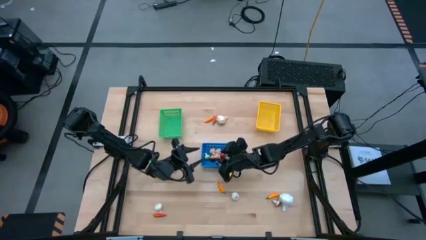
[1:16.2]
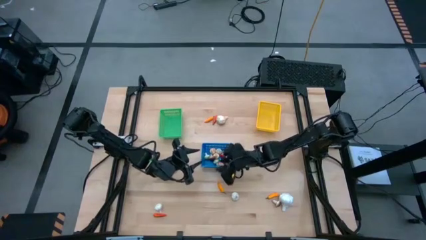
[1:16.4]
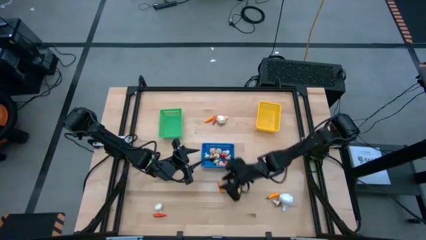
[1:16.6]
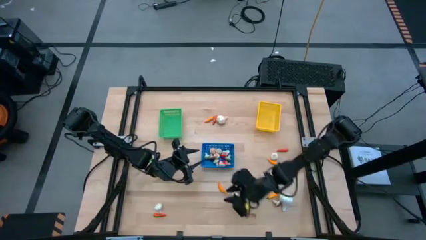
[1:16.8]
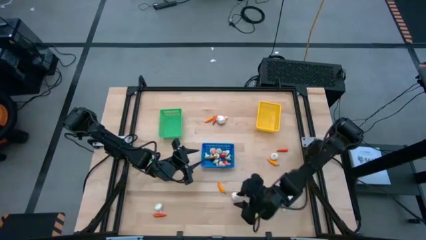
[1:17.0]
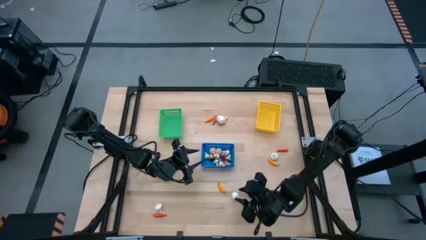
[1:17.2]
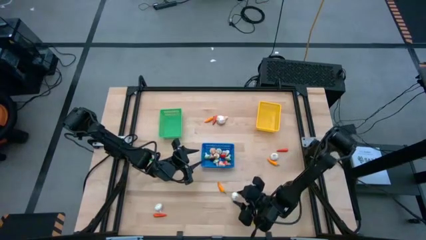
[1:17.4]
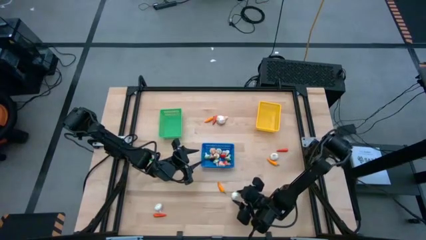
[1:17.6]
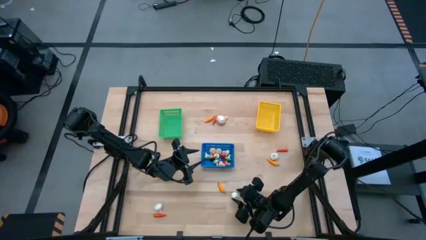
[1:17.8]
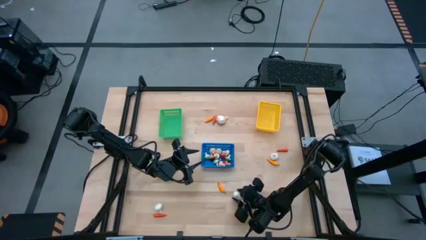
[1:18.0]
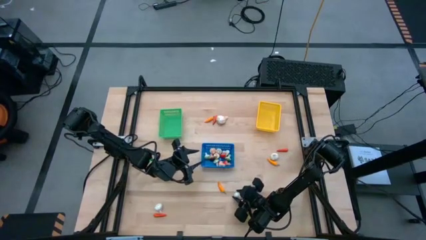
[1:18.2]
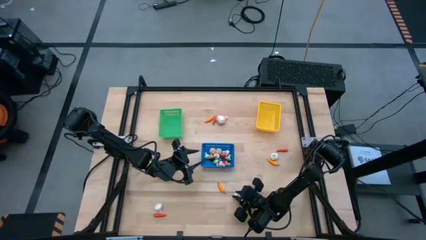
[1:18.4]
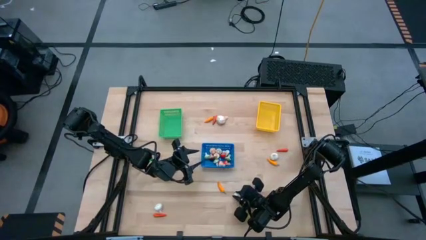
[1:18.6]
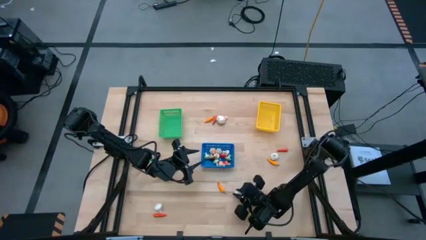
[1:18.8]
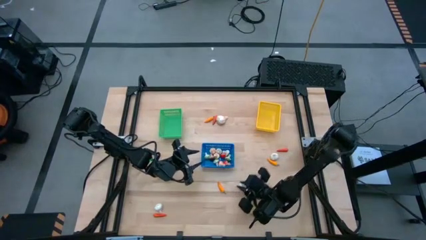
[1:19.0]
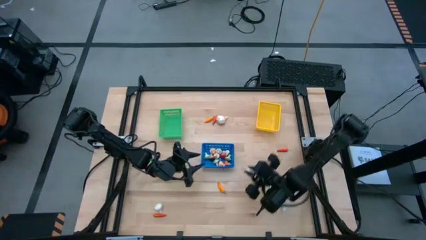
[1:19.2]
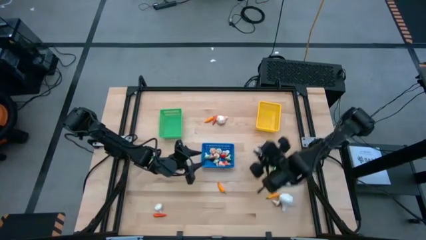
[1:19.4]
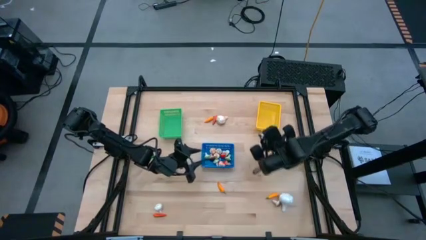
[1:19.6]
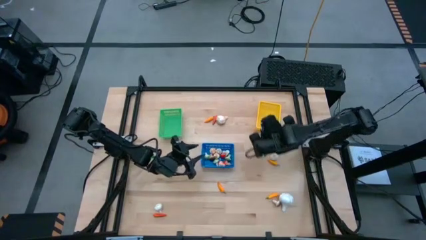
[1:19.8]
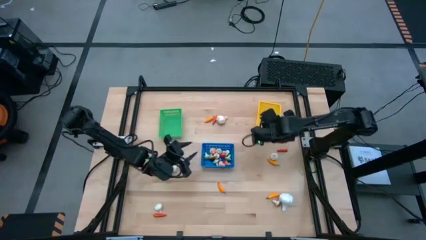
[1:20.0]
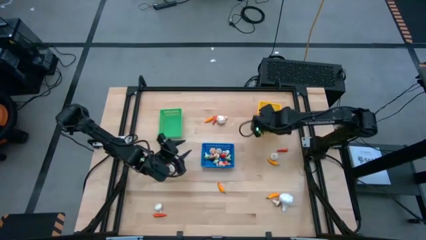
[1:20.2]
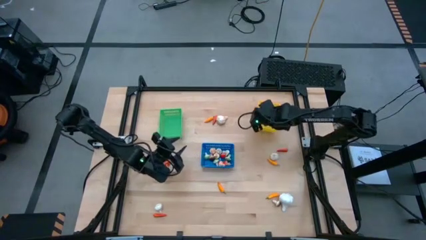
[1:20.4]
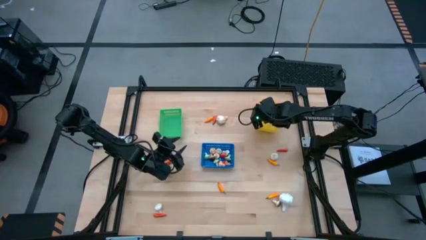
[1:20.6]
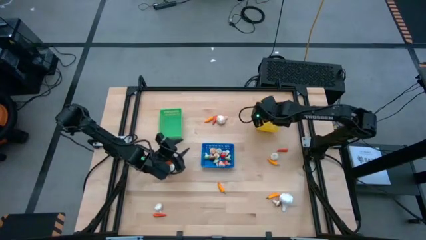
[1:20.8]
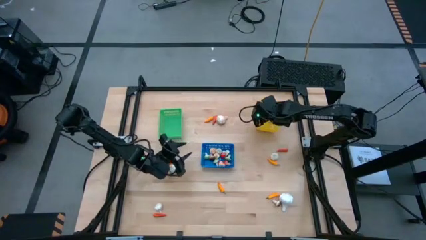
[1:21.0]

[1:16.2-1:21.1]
Task: Sort produce into baskets
Put the white garlic into the yellow bin

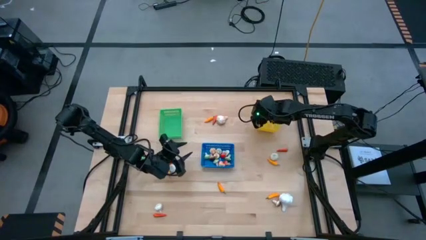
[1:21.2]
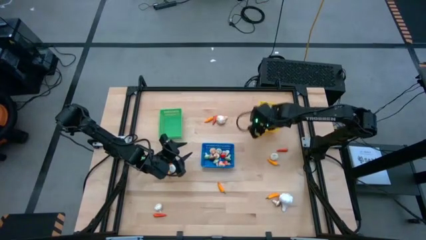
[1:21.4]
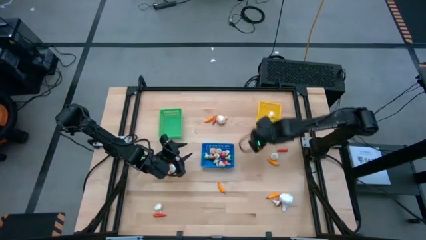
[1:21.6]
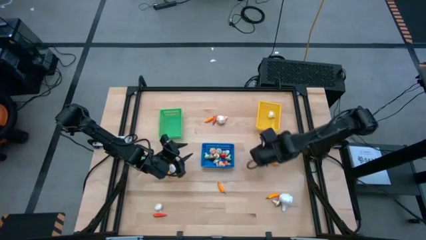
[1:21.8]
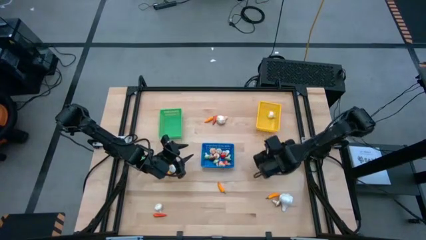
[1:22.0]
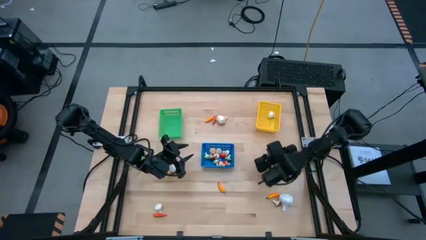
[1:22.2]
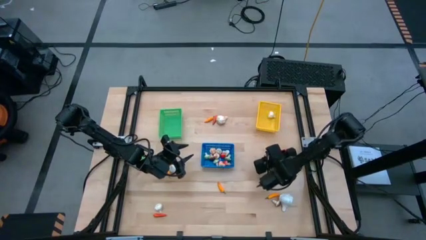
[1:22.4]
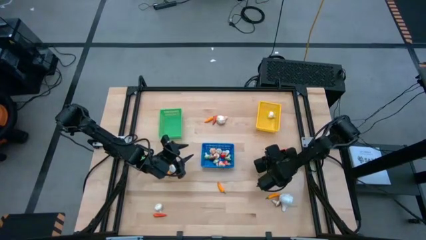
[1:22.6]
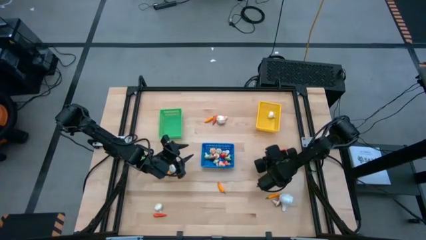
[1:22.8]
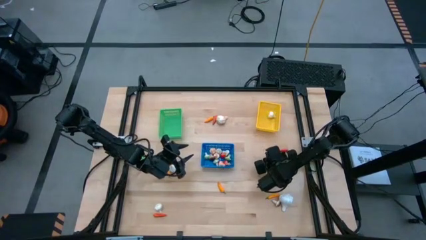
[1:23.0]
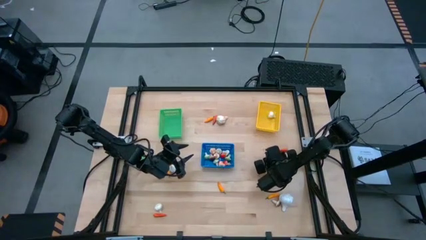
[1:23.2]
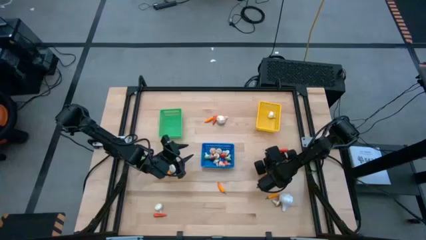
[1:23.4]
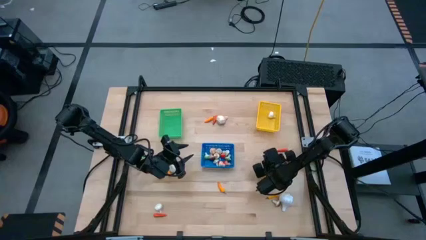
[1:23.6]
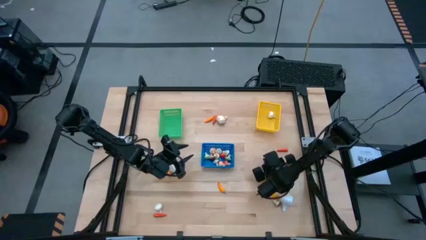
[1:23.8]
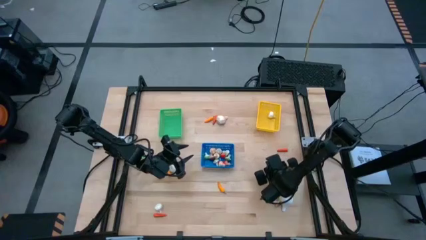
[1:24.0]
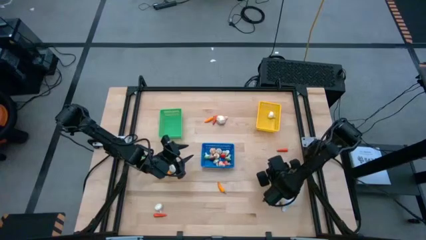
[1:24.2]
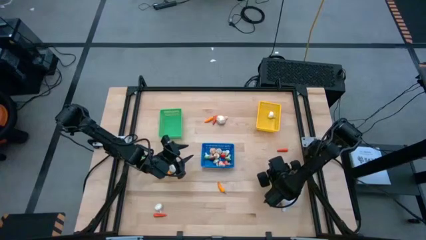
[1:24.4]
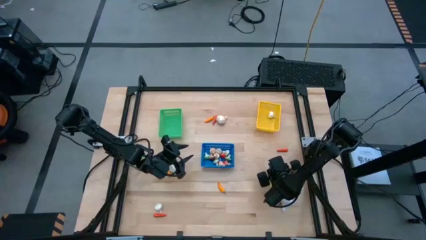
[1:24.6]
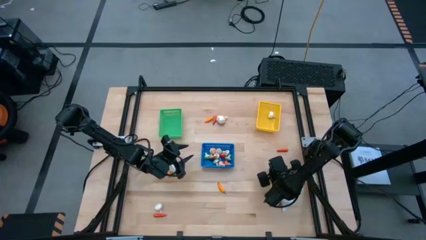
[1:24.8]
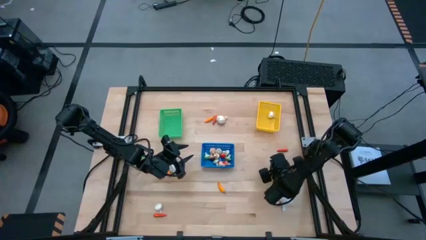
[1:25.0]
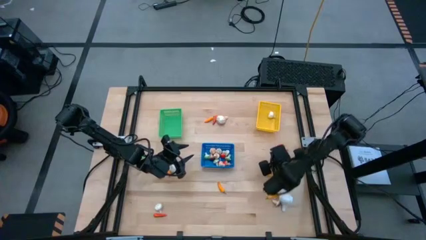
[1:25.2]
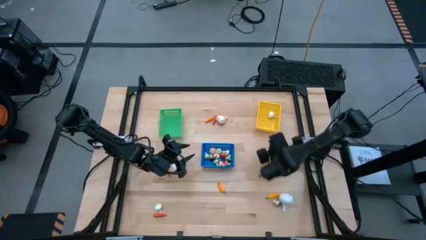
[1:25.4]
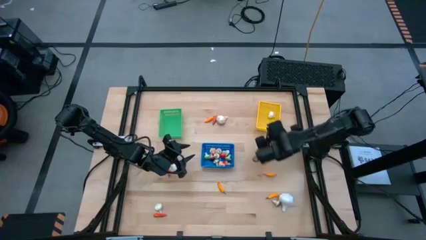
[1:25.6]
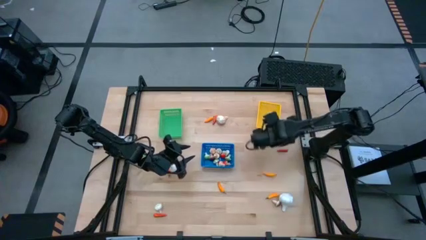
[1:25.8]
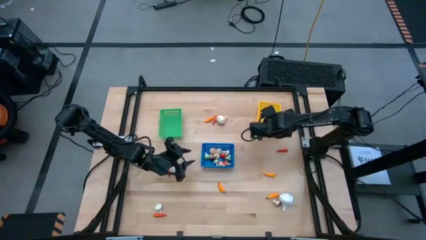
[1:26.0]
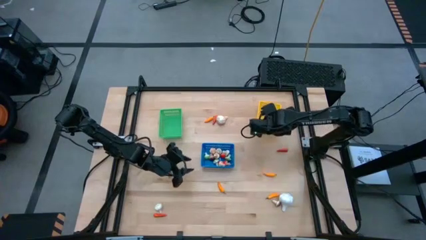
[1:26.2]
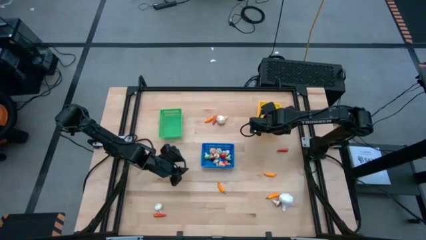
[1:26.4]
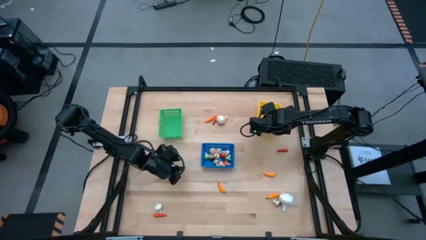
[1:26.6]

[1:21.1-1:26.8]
Put the white garlic into the yellow bin

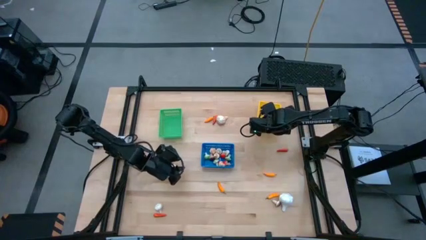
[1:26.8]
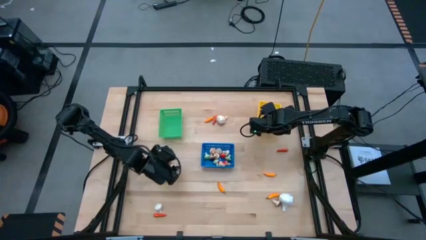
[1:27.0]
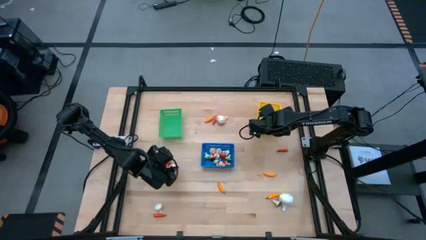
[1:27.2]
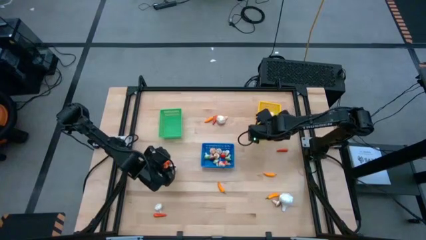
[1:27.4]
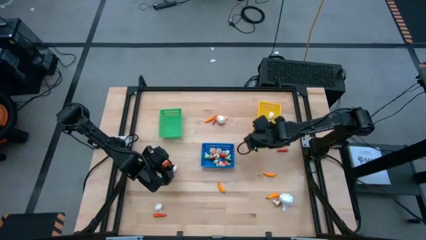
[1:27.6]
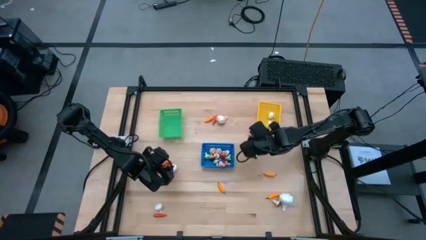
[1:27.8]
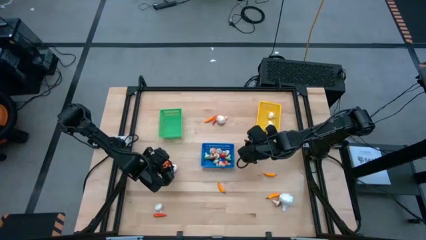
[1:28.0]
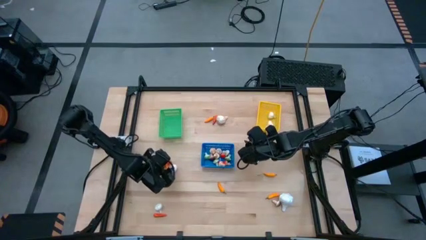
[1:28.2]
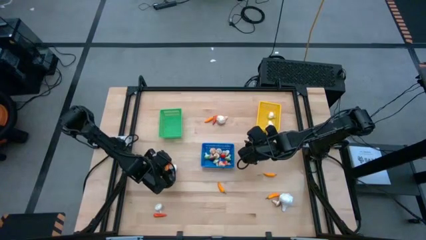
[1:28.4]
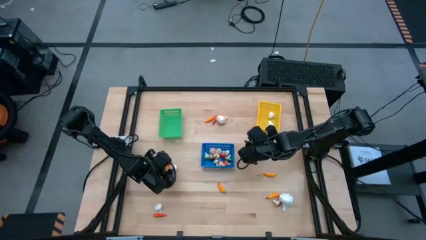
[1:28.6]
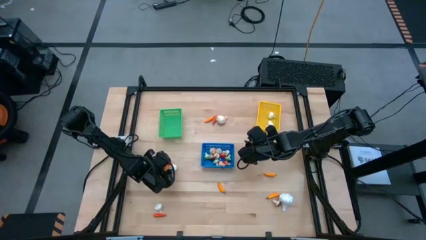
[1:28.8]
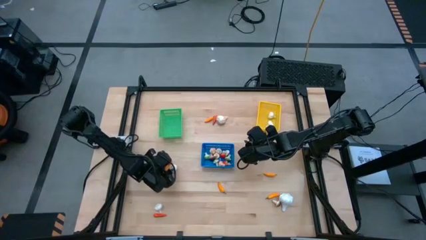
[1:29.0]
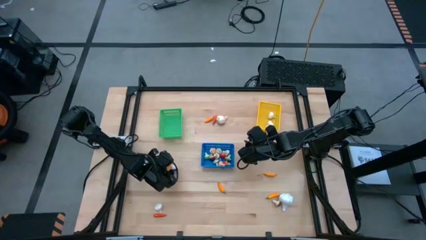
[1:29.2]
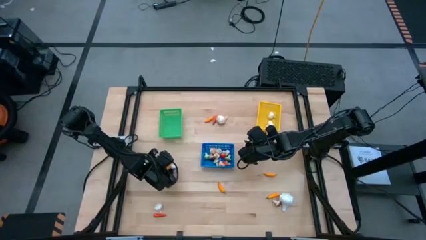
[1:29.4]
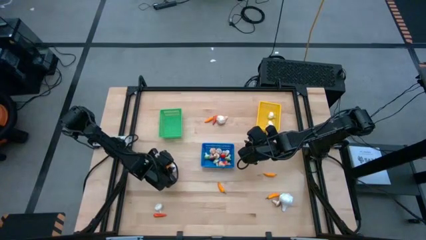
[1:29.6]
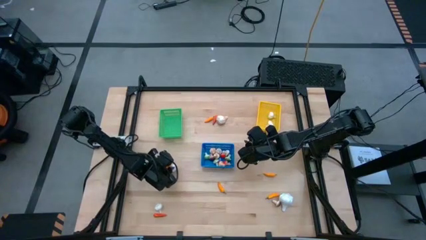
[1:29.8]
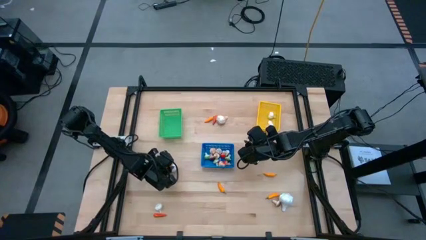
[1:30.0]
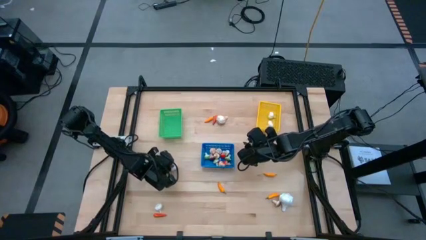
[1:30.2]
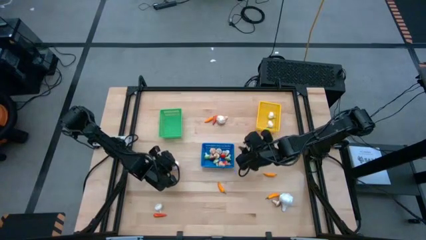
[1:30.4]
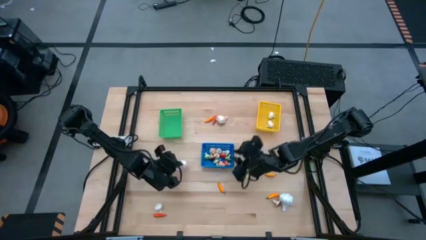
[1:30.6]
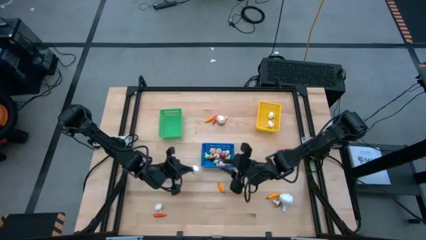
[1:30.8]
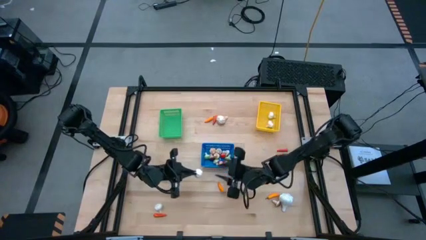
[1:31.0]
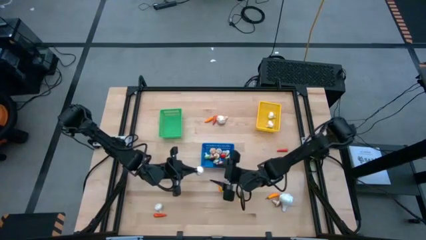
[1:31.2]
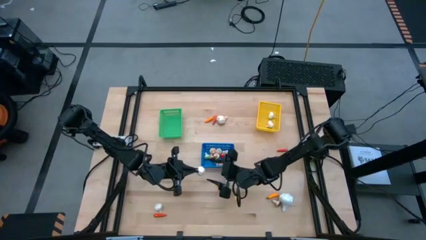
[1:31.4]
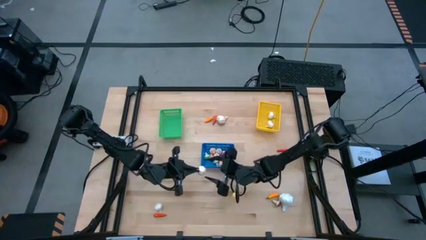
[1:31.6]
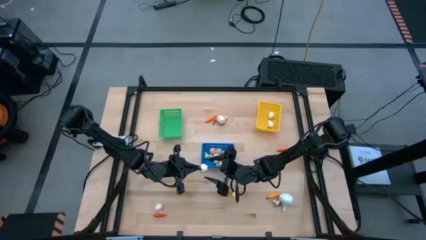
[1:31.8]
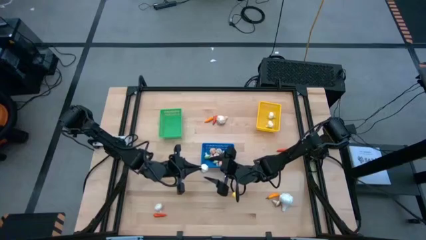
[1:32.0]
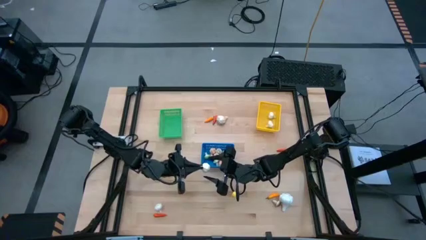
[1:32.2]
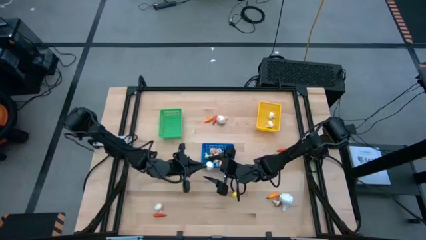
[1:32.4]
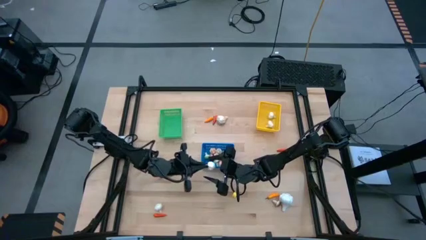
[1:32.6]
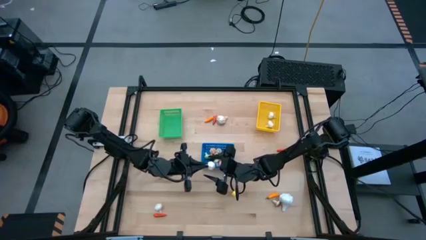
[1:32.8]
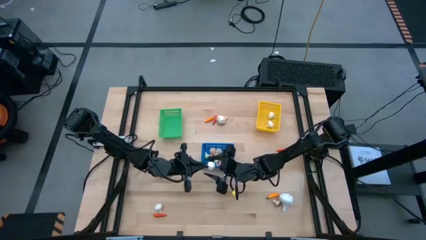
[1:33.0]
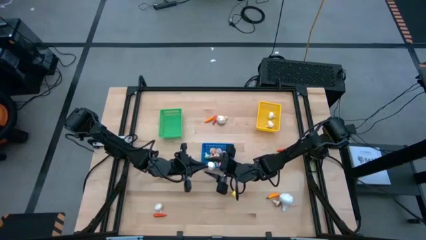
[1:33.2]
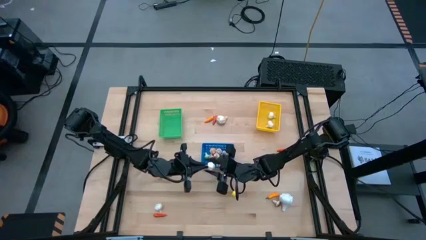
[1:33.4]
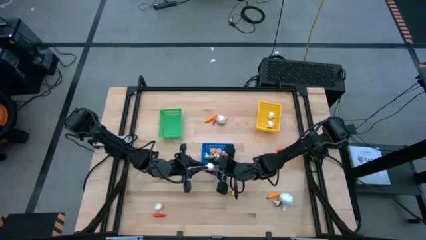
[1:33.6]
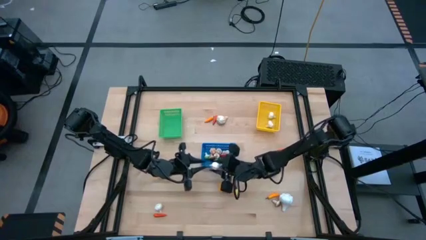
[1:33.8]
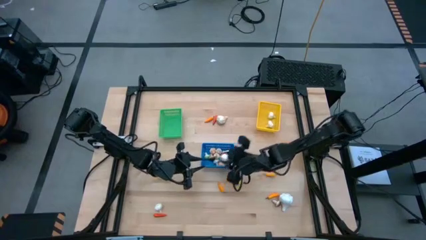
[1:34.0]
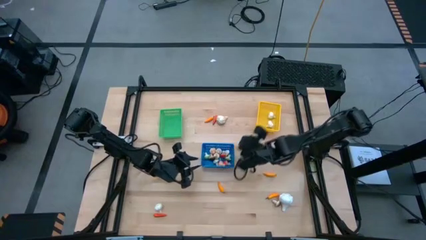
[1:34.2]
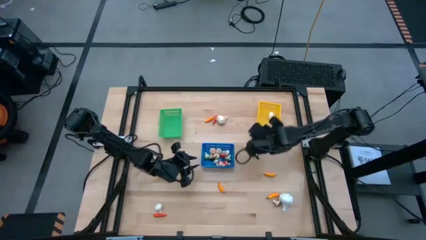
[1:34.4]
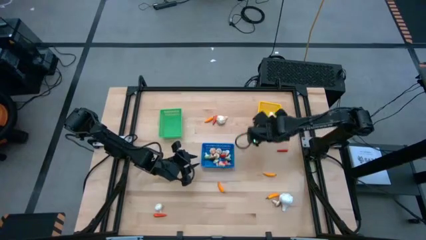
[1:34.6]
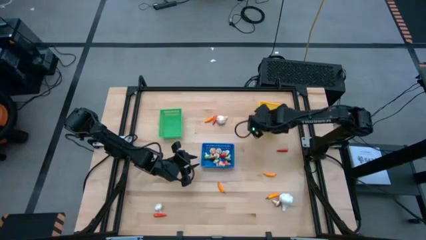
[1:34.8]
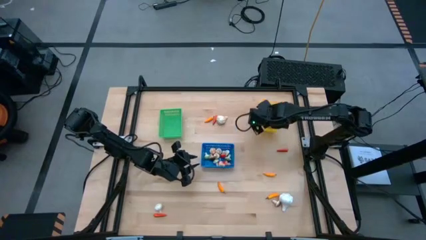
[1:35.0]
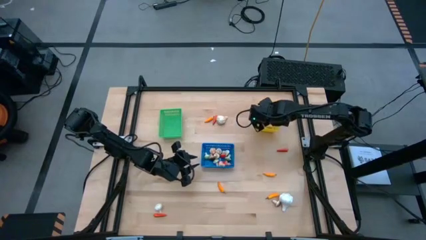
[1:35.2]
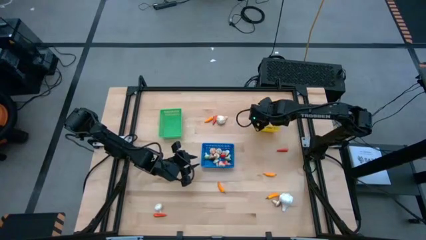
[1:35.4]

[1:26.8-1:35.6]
Put the white garlic into the yellow bin
